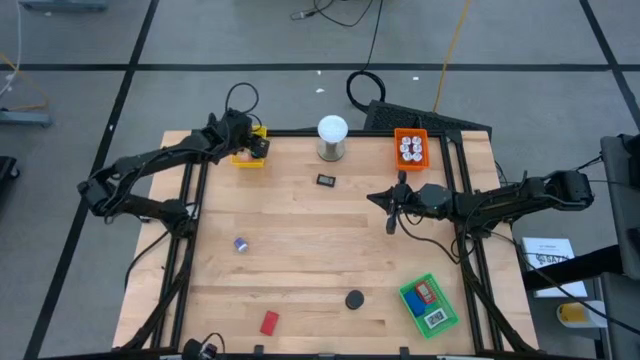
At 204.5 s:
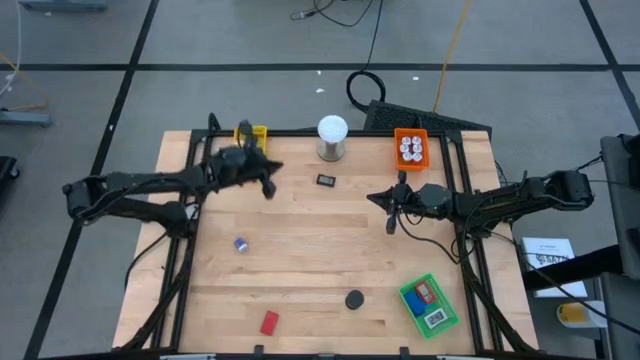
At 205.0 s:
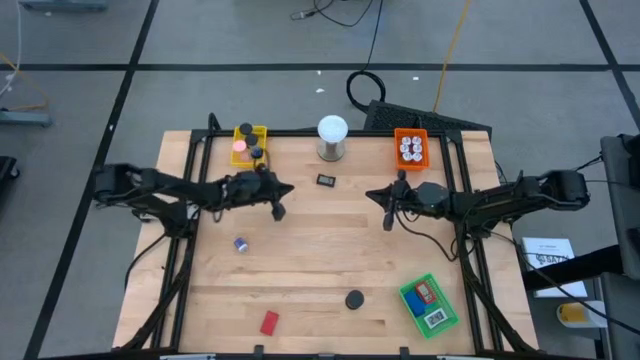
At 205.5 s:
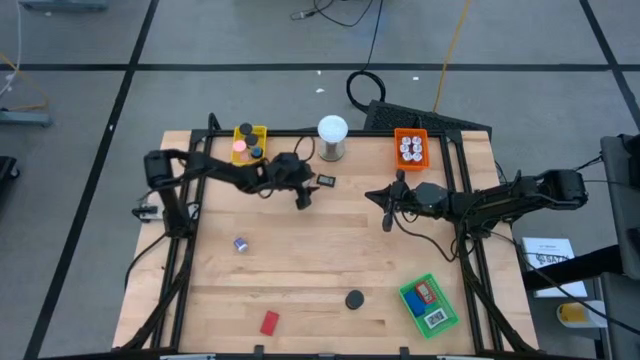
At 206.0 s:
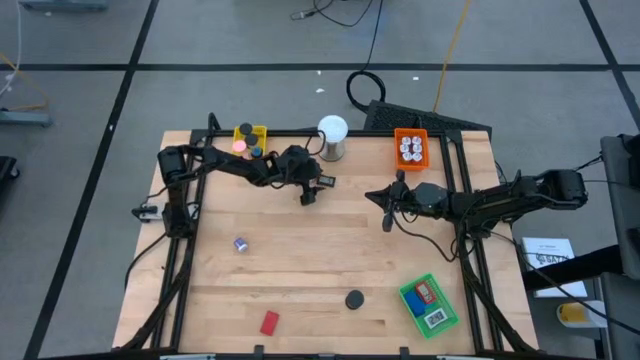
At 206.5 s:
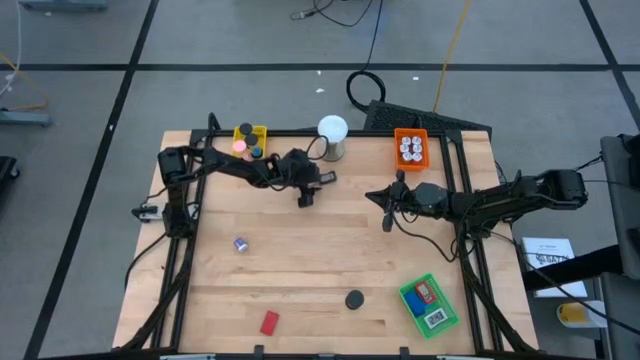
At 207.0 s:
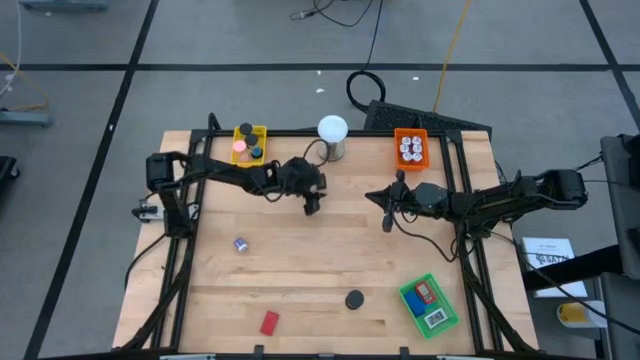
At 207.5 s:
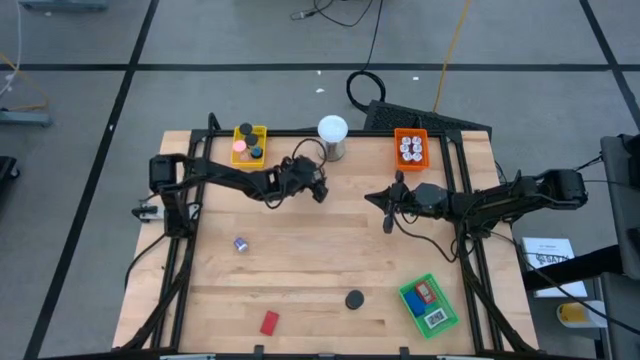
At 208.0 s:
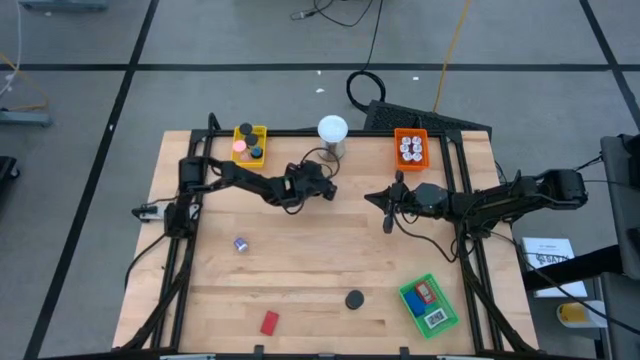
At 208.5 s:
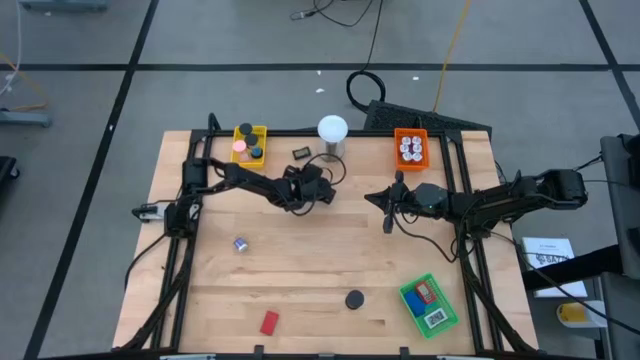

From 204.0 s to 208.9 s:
Task: Pick & Place Office items
Put the black digital clock into the green bin

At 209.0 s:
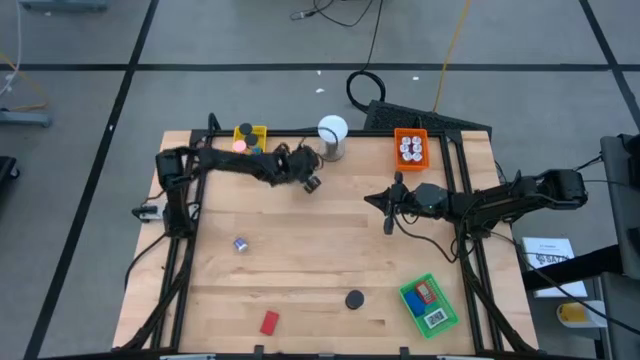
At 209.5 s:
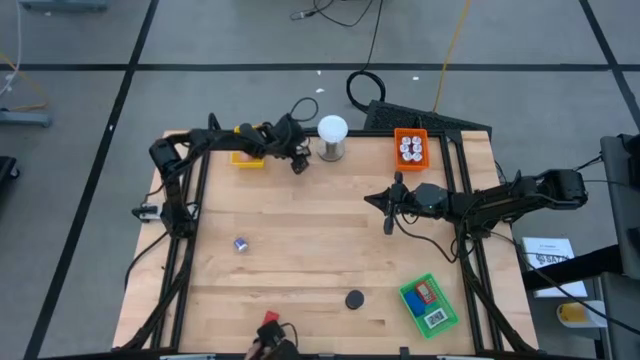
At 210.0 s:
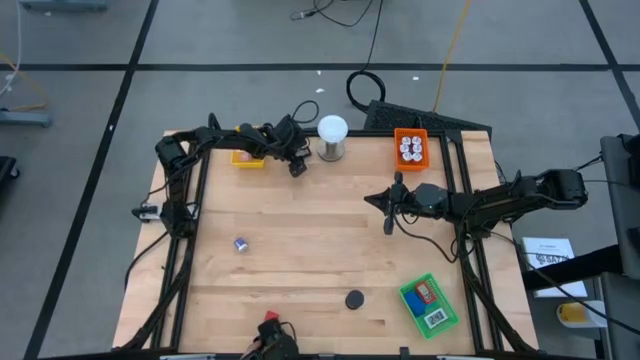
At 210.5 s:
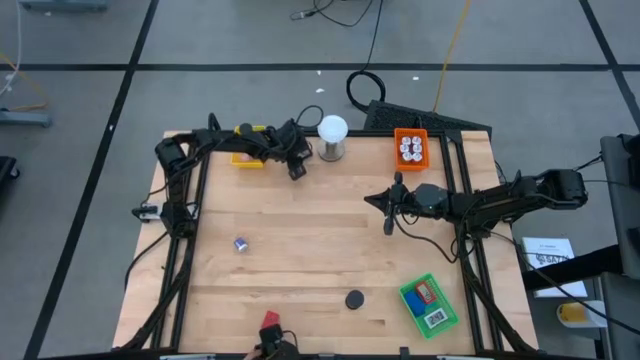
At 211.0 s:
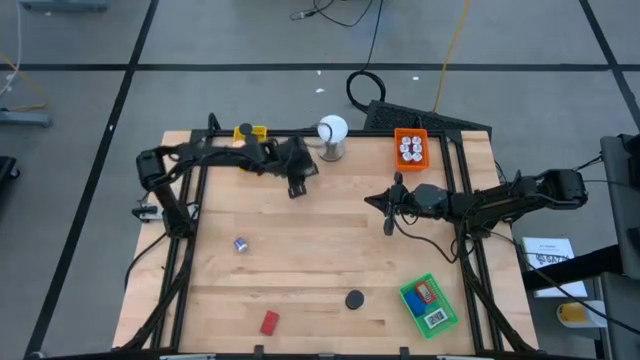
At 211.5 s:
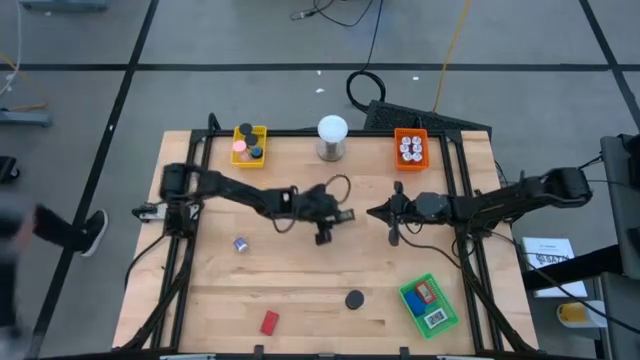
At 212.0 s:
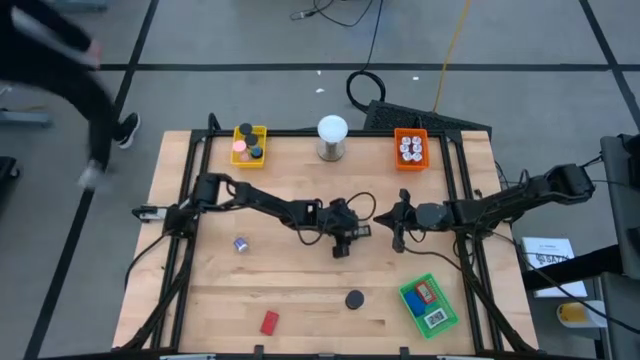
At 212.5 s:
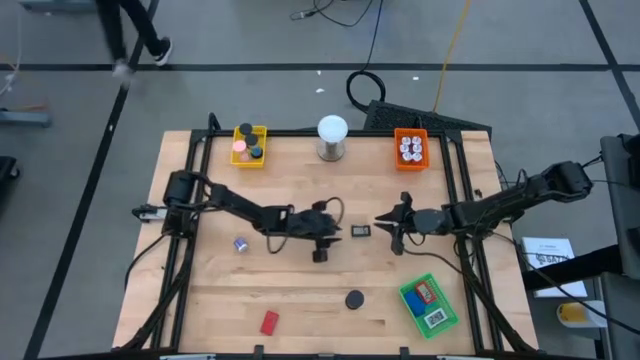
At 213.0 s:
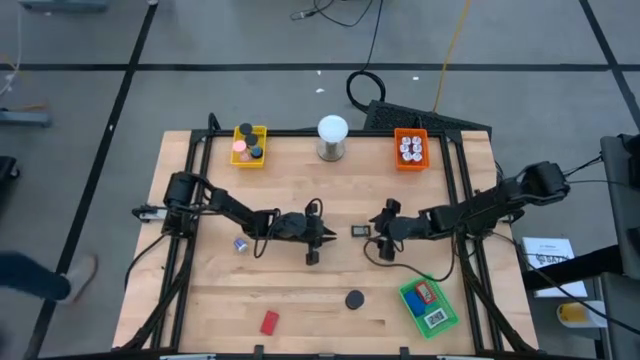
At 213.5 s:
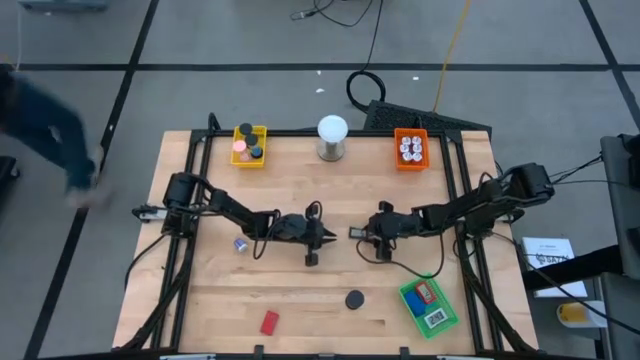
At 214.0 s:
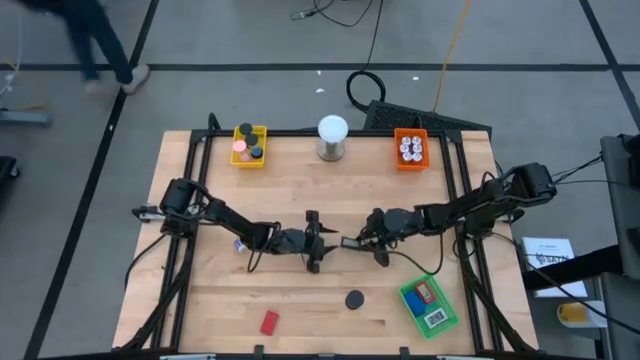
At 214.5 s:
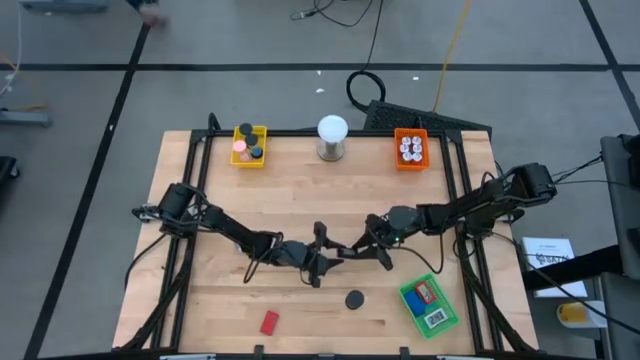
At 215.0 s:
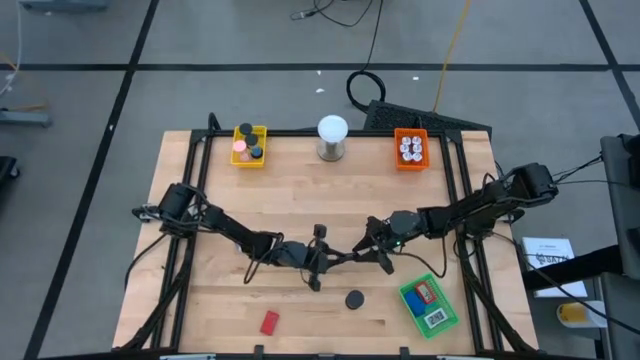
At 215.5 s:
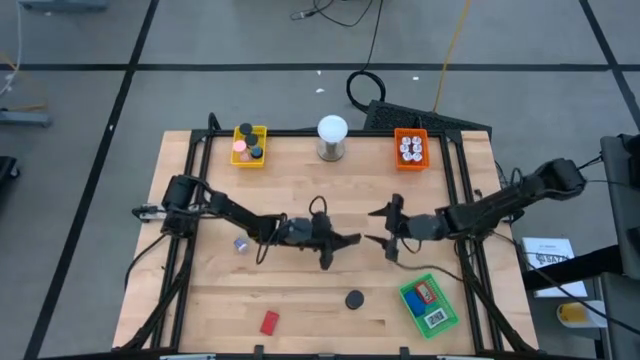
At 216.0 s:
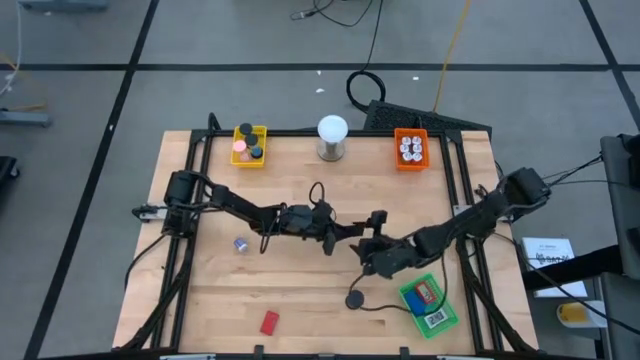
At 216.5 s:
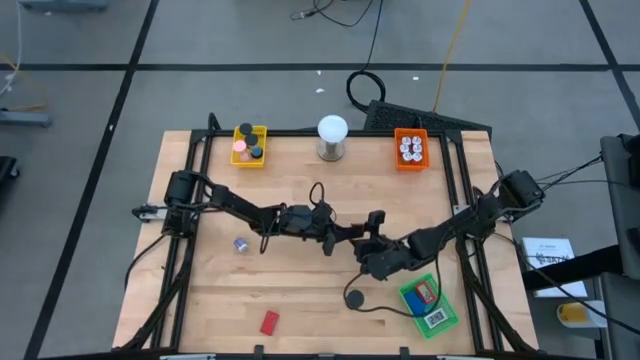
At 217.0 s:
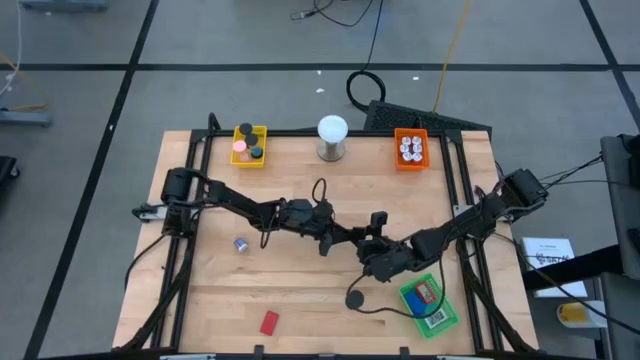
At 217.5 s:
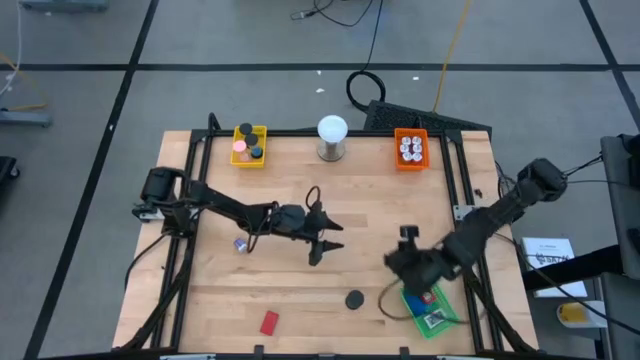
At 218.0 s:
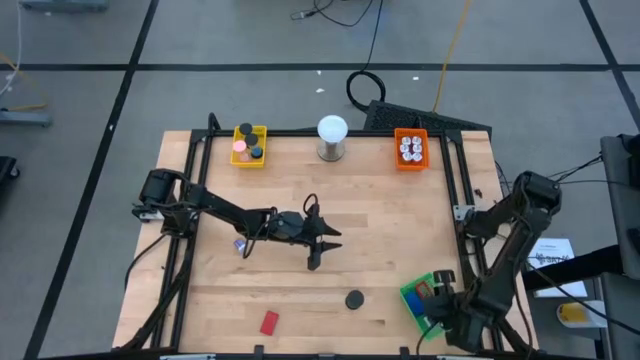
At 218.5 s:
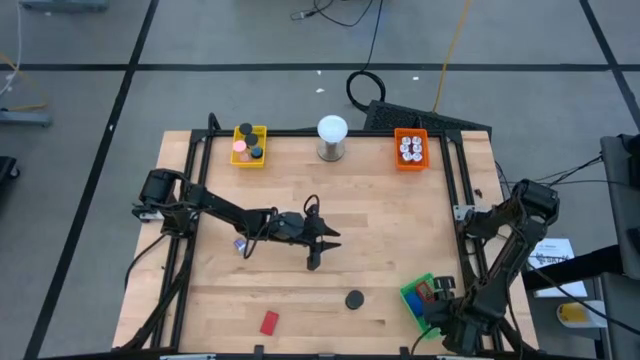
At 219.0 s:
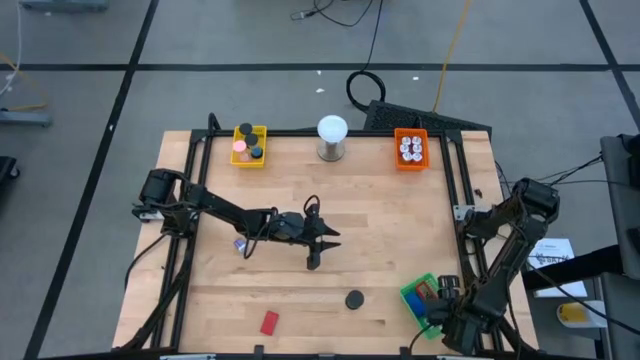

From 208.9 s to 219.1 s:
Put the black digital clock into the green bin

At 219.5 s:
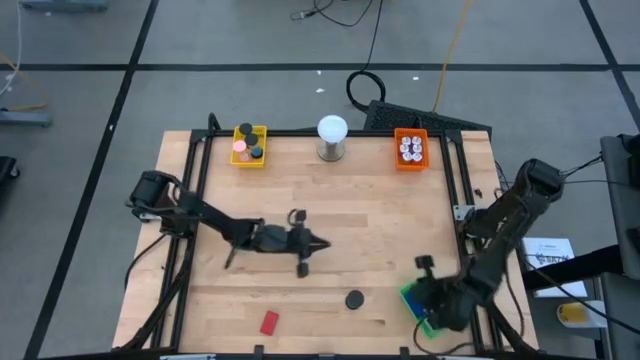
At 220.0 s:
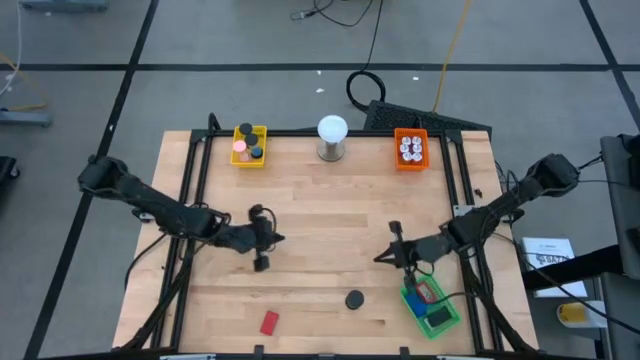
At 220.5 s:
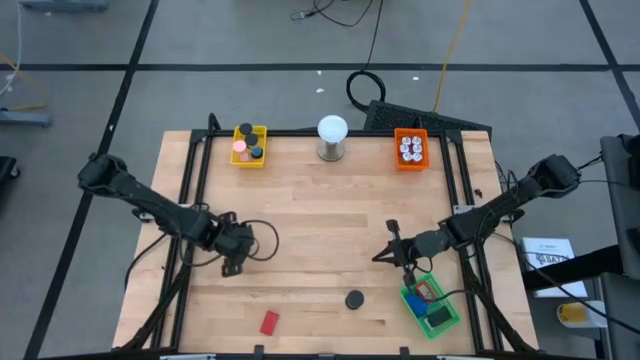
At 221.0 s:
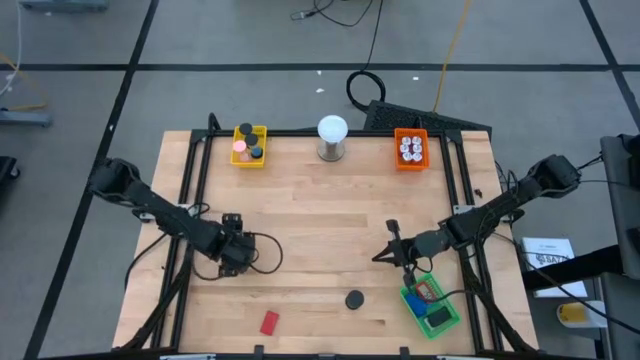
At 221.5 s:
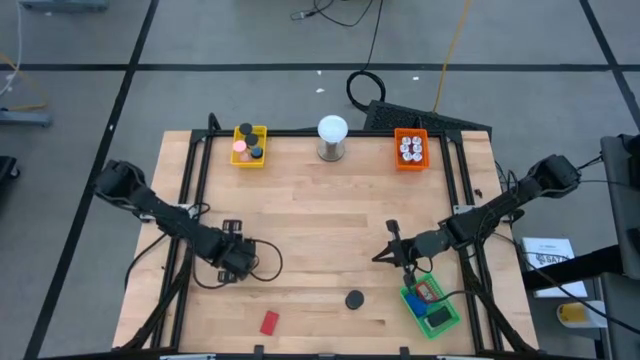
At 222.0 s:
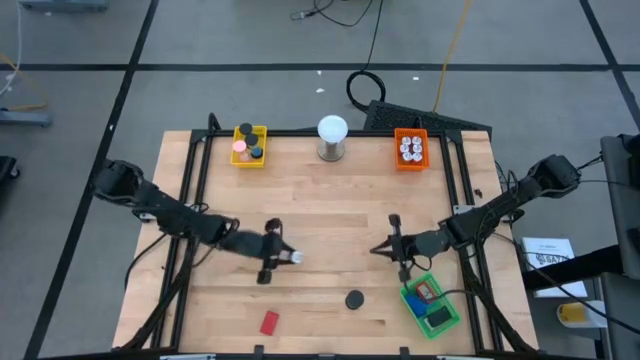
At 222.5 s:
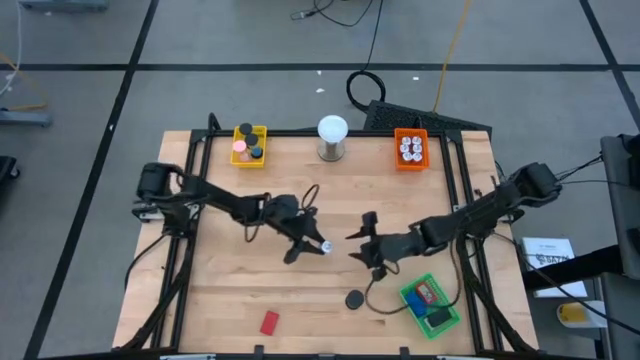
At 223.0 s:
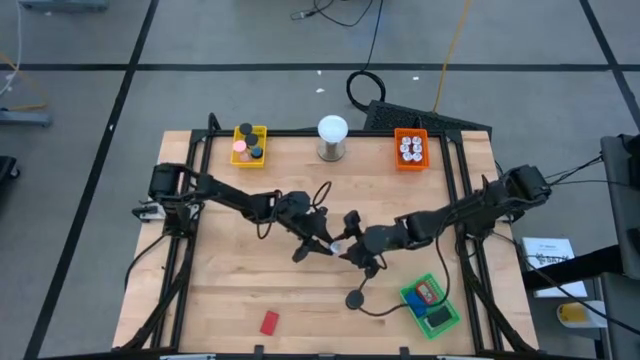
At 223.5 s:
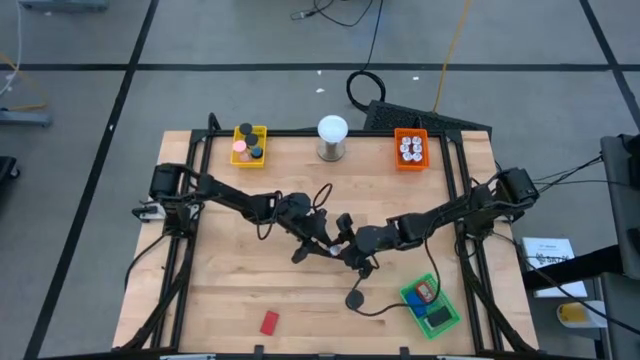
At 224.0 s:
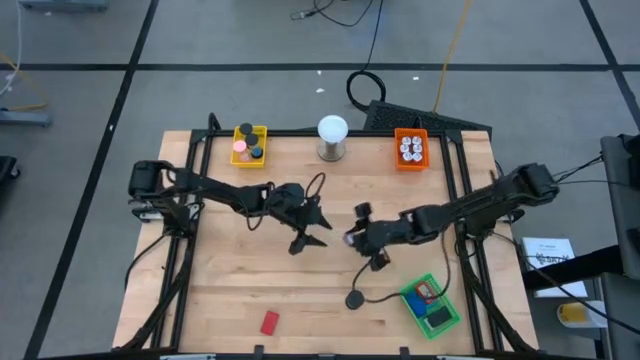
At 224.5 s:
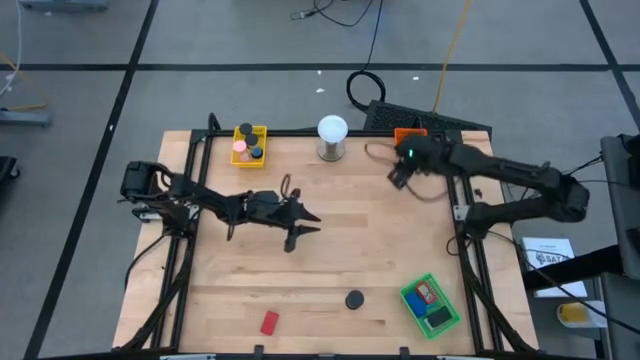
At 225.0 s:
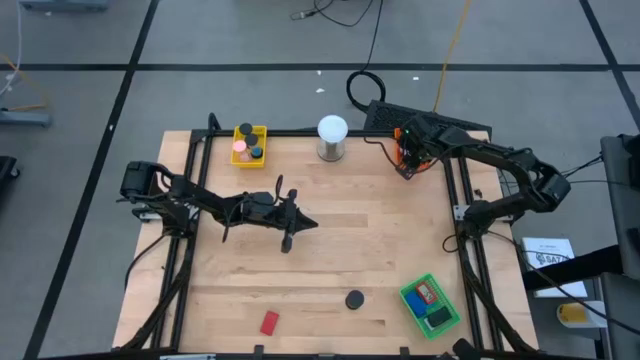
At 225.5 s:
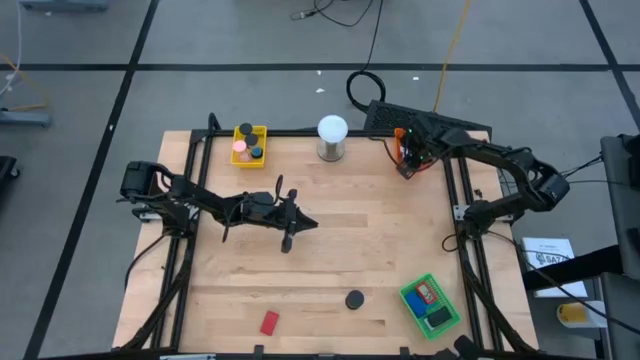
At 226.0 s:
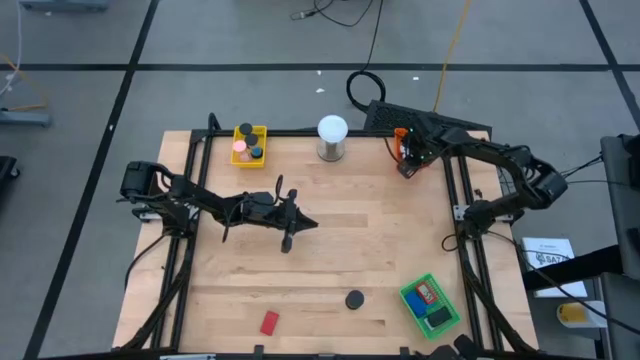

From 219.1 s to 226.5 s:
Put the violet charger adaptor into the orange bin
